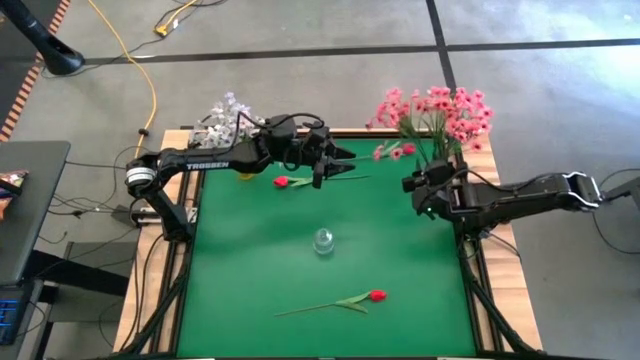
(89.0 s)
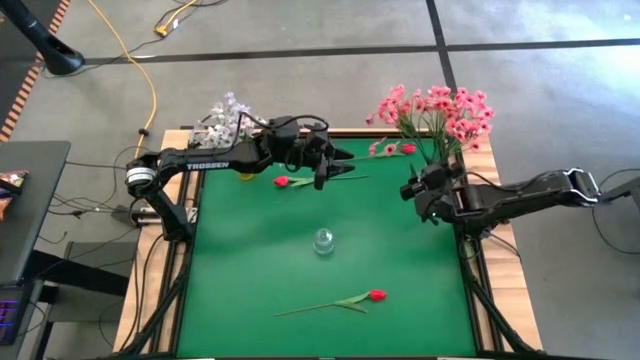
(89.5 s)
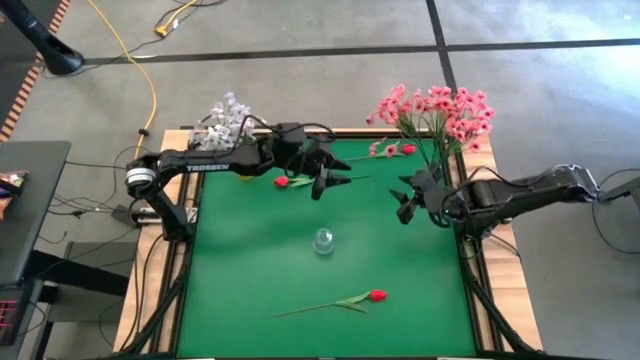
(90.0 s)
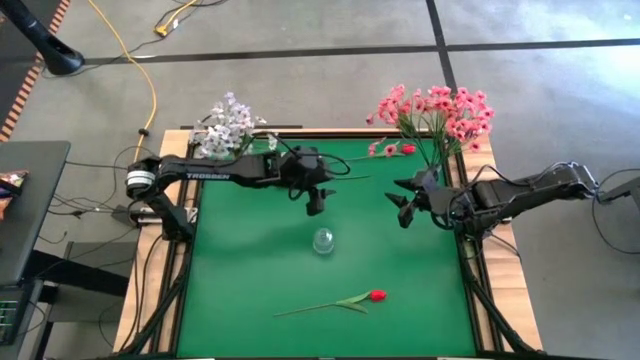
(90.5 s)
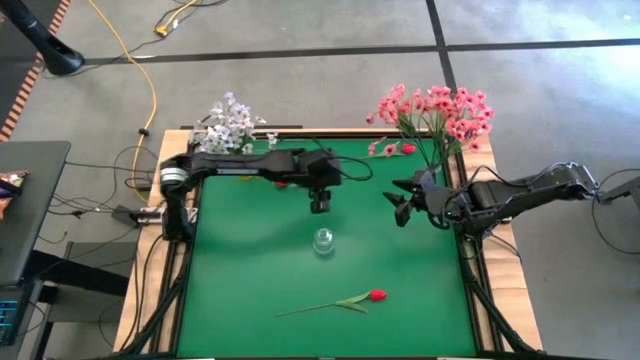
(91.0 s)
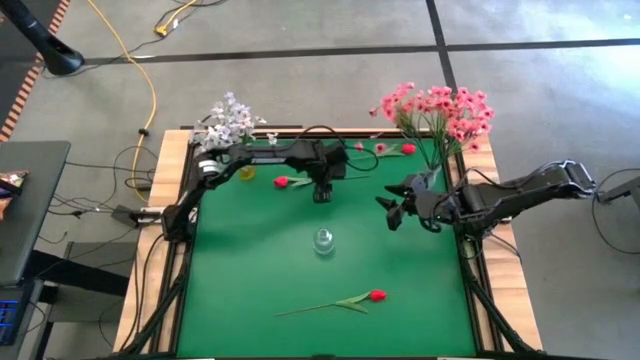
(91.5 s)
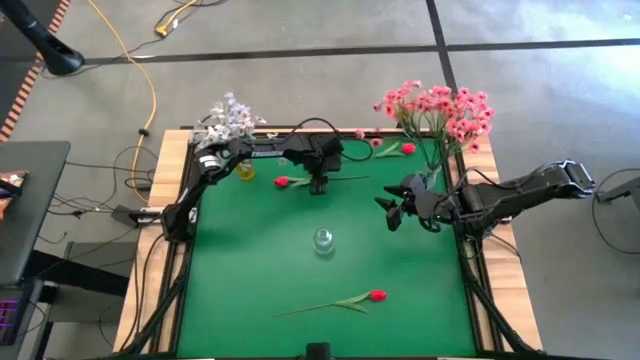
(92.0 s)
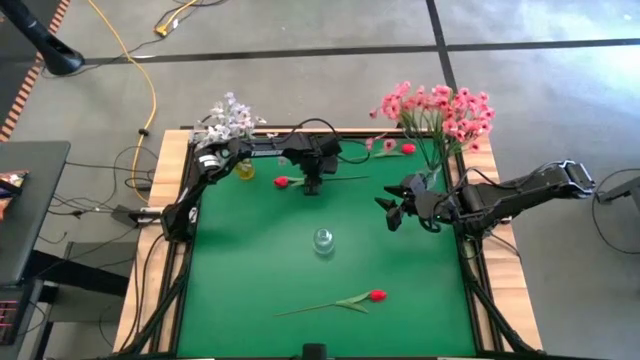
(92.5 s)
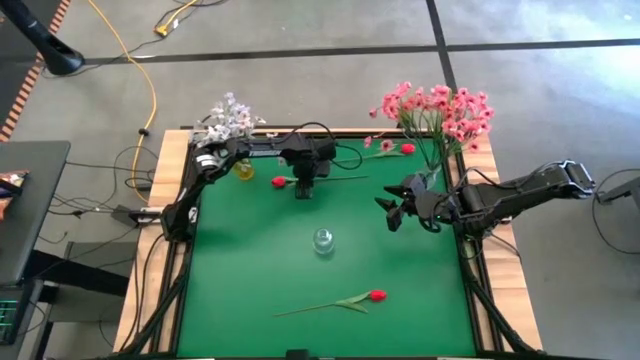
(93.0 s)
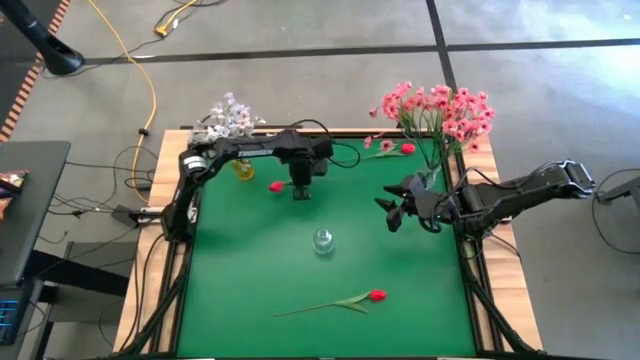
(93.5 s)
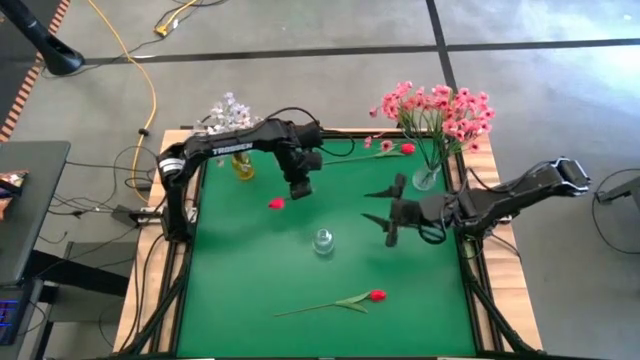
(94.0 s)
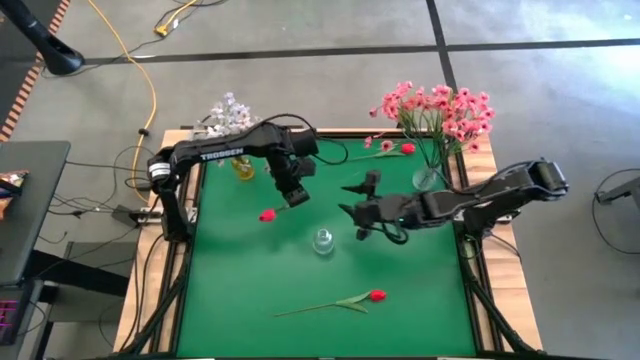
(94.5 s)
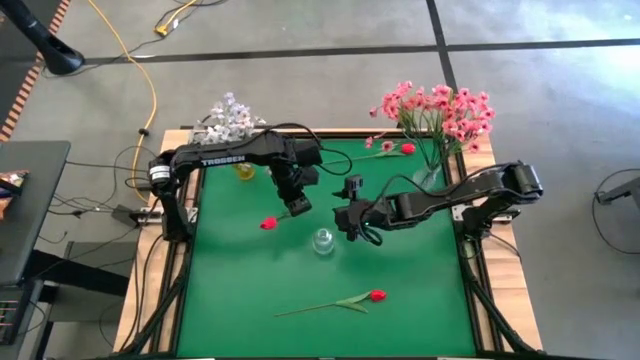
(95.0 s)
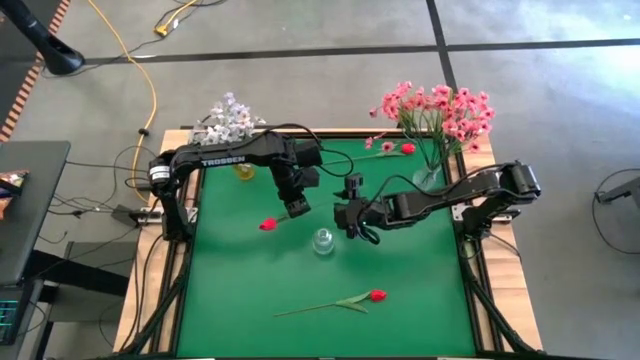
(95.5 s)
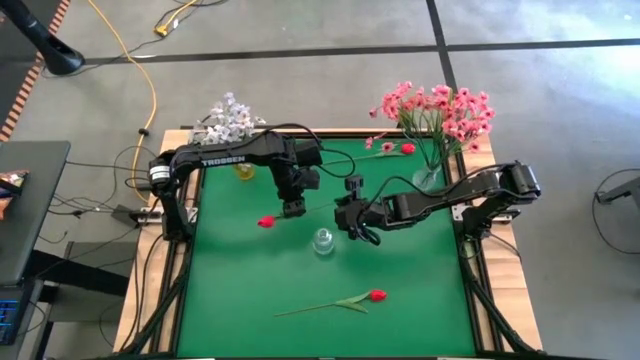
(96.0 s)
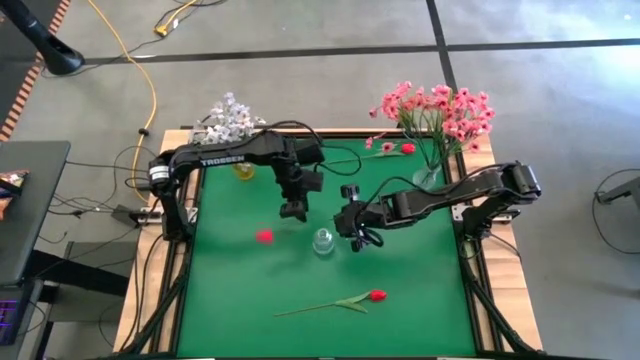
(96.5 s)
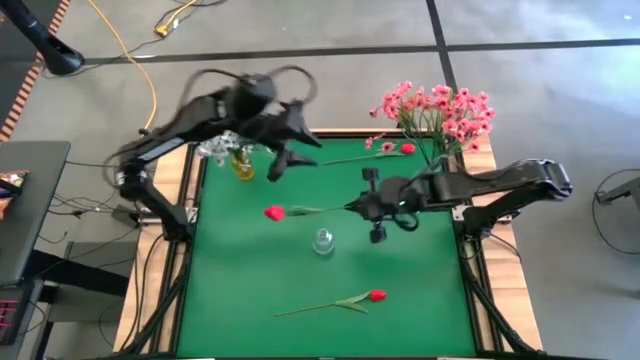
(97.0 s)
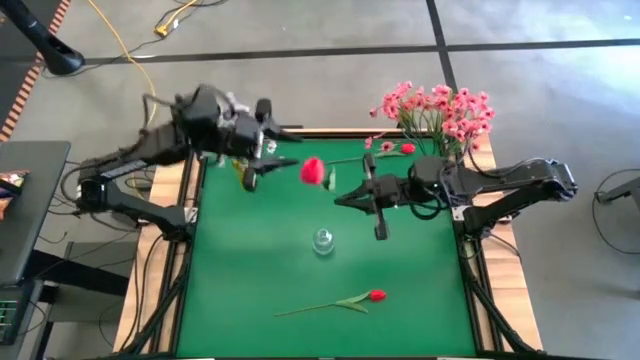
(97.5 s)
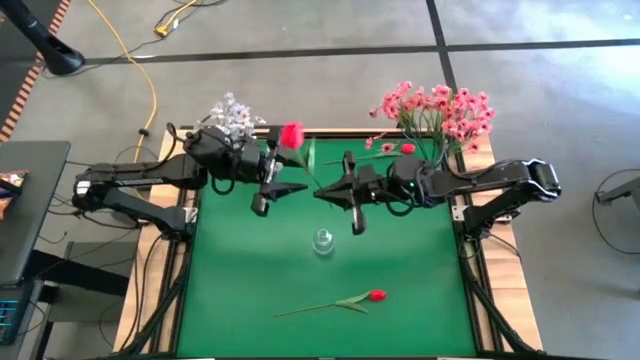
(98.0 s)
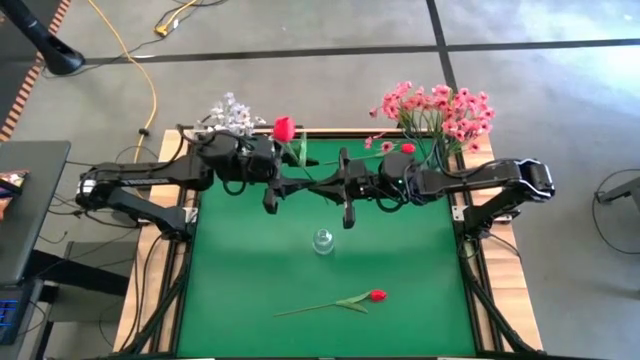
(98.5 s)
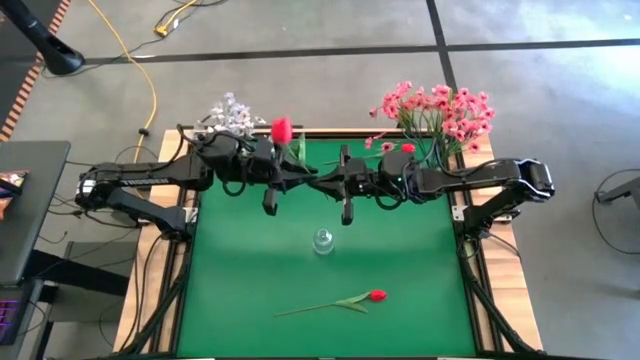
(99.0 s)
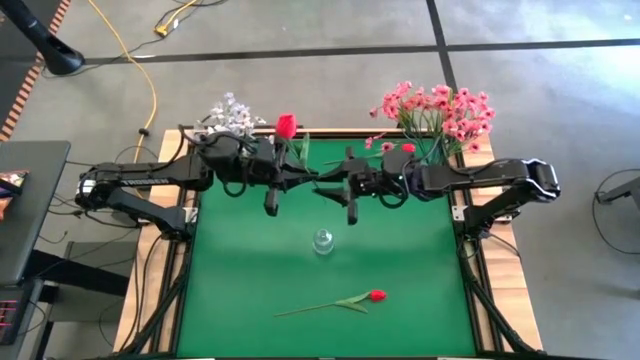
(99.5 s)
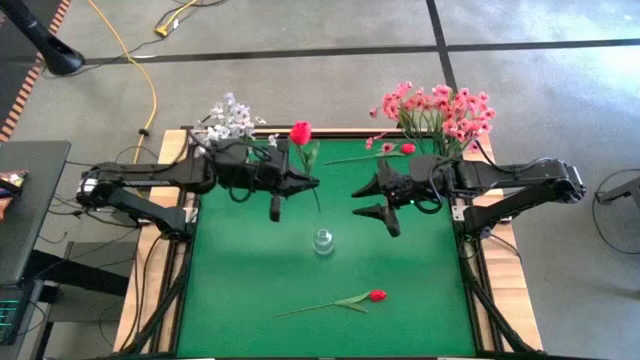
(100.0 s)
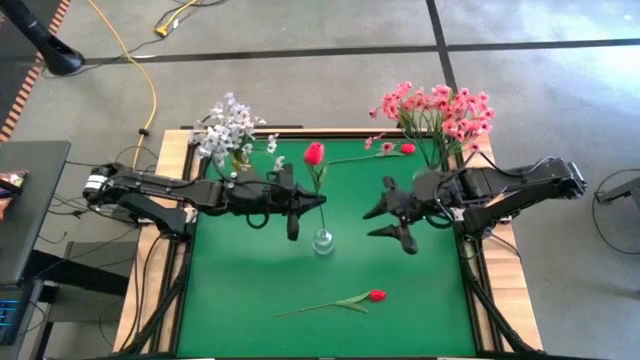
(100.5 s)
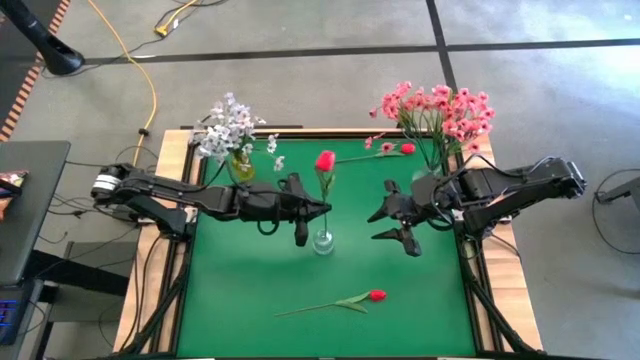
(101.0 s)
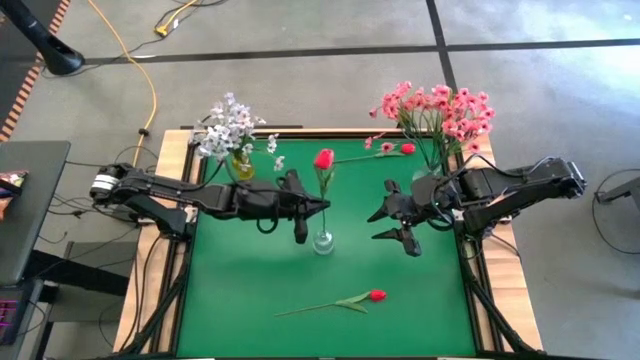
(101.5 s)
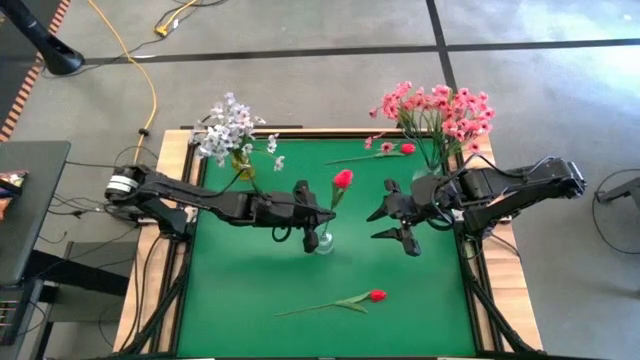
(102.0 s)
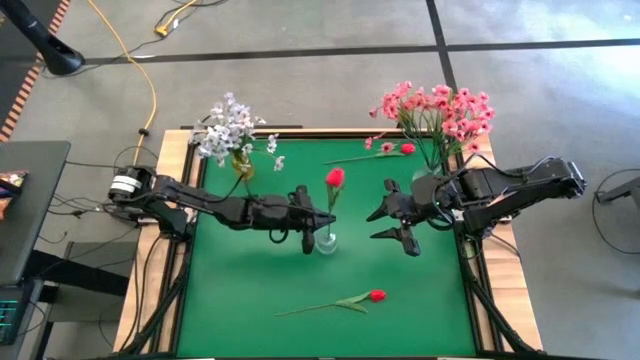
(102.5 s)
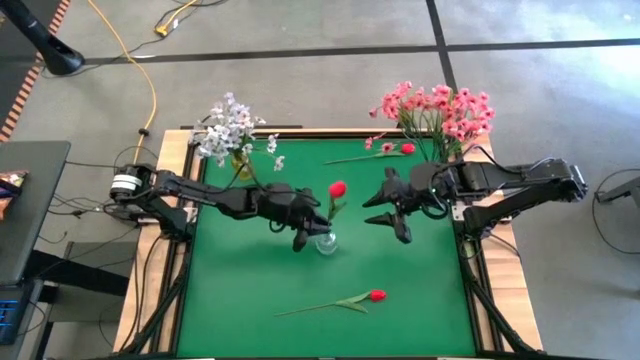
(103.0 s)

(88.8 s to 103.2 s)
Task: Sort flowers into vase by color
Put the middle red flower into the bottom transparent vase

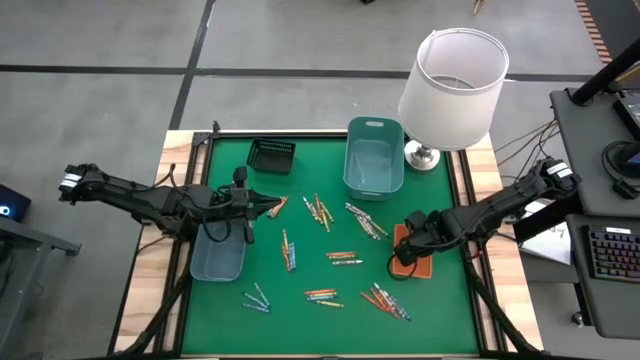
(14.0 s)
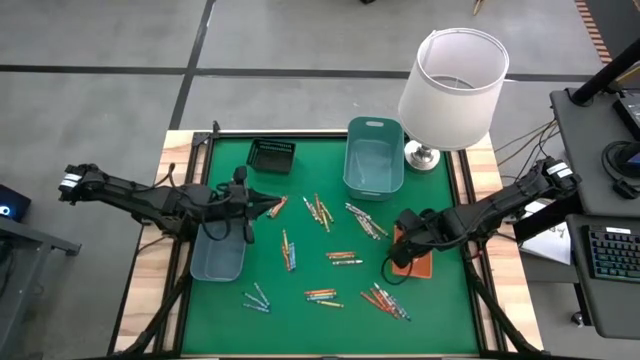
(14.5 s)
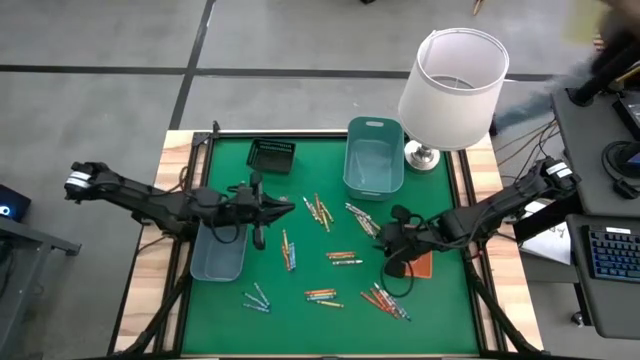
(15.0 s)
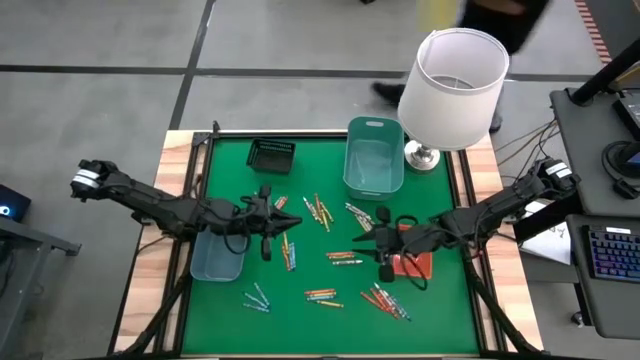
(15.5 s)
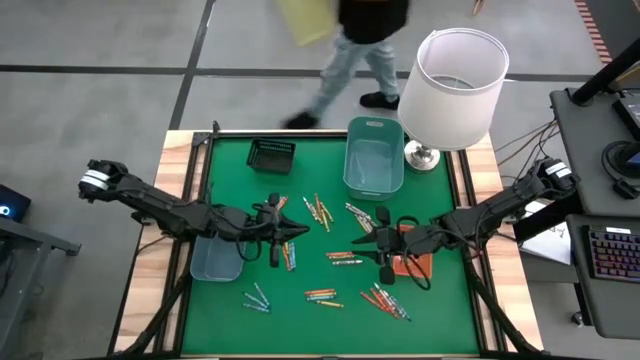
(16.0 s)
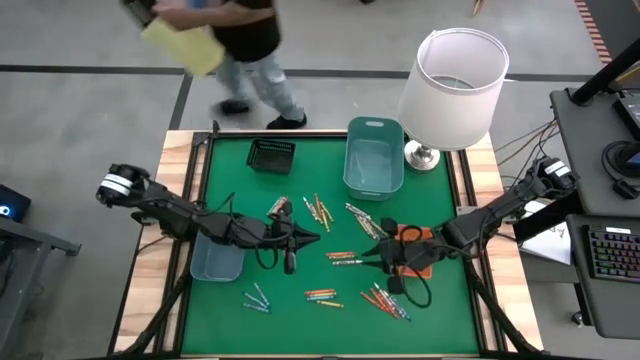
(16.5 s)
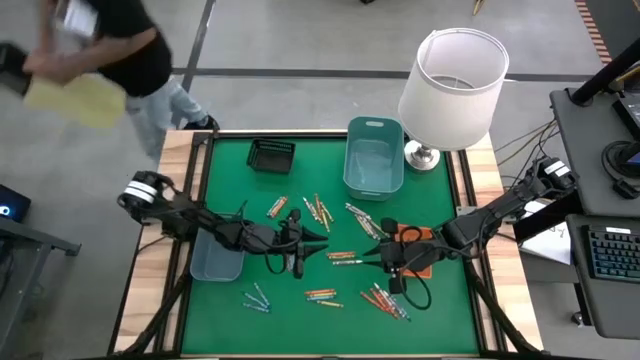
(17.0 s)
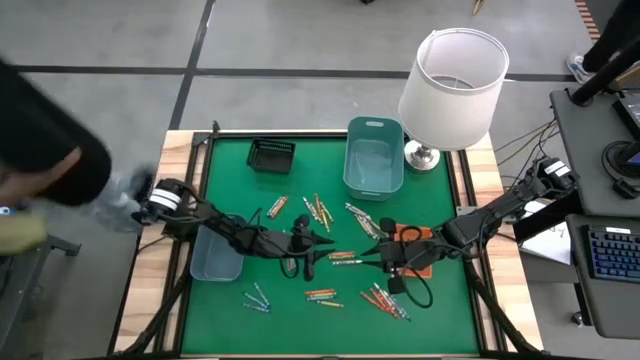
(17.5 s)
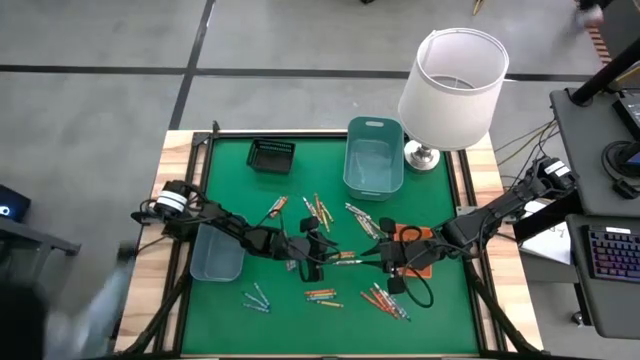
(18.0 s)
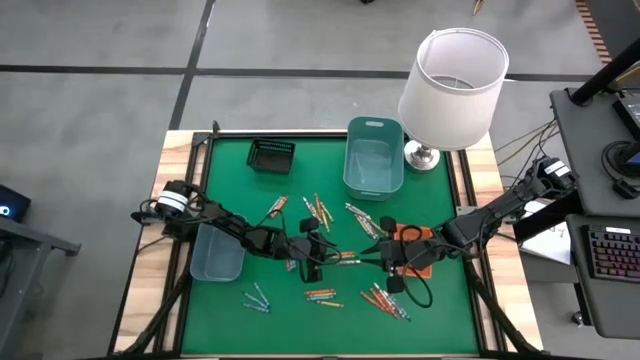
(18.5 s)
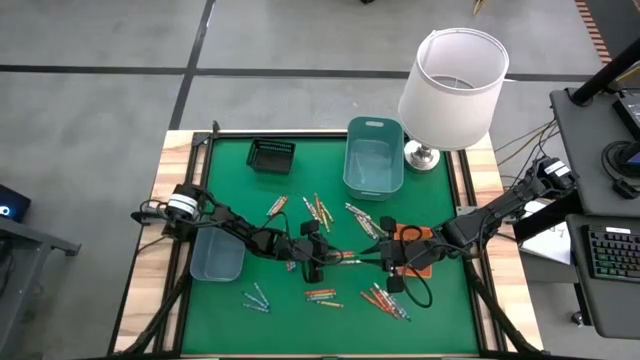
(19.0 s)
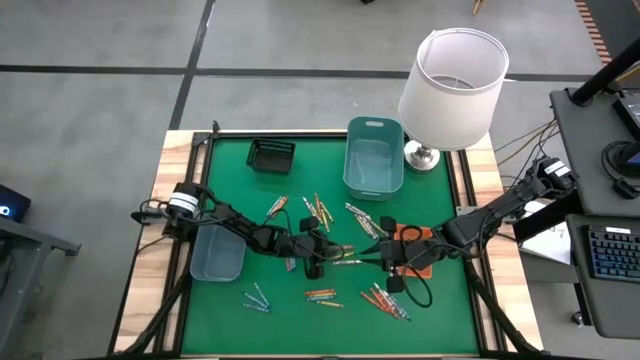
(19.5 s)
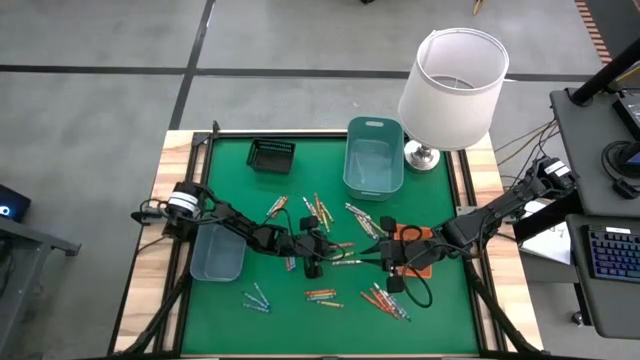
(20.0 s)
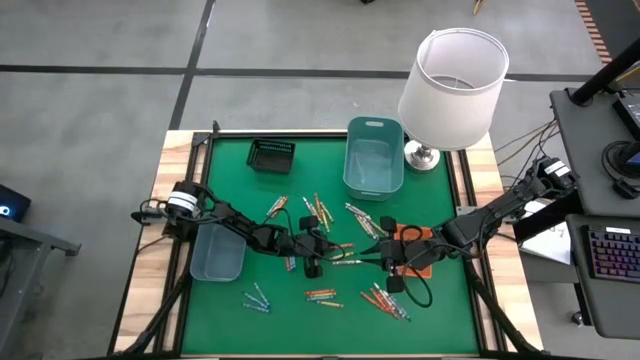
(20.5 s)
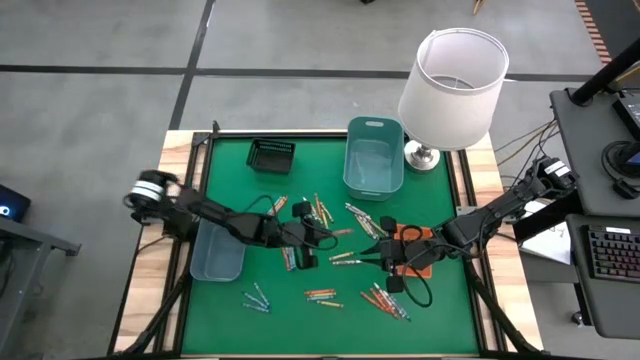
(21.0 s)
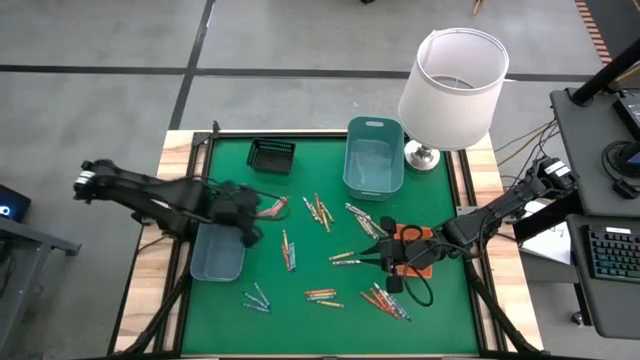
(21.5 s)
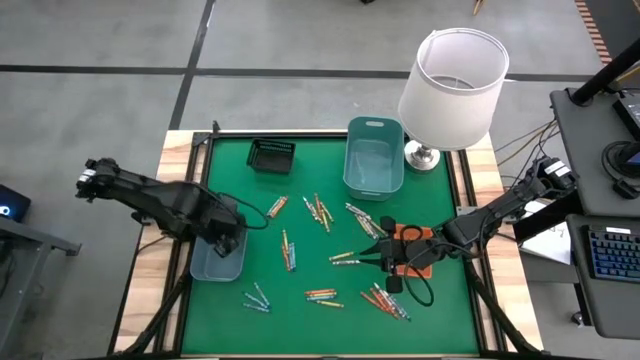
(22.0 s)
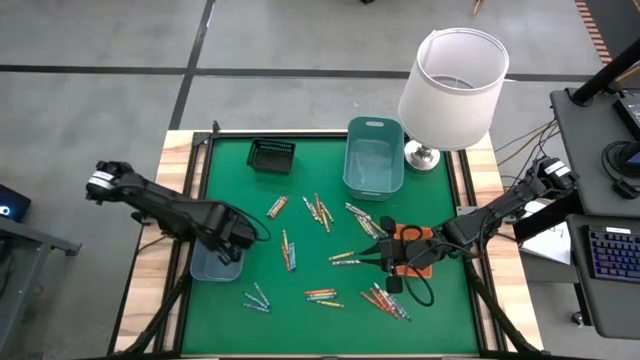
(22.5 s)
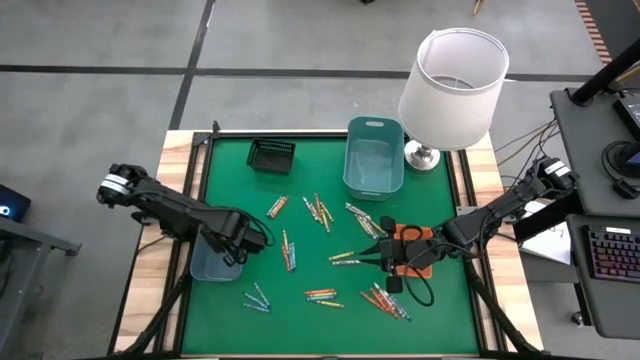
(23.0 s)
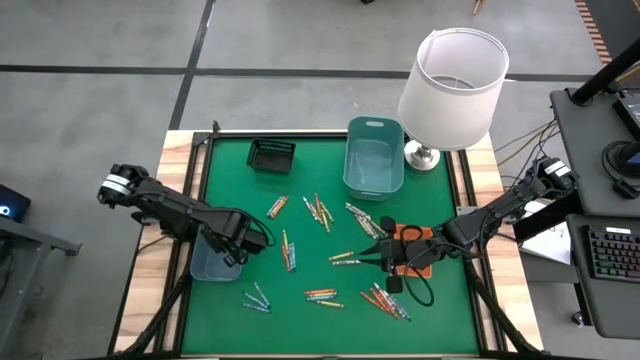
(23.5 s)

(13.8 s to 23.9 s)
Task: Sort crayons
Put the orange crayon into the blue bin
